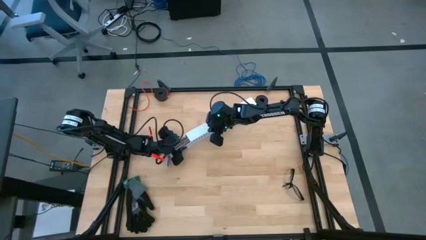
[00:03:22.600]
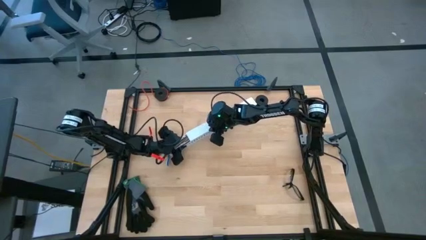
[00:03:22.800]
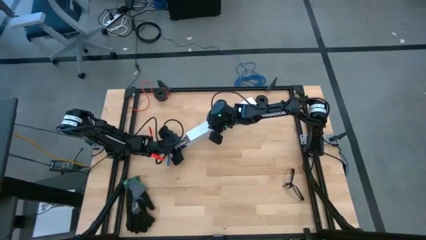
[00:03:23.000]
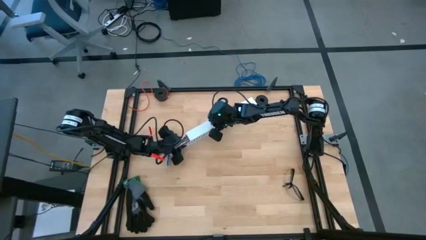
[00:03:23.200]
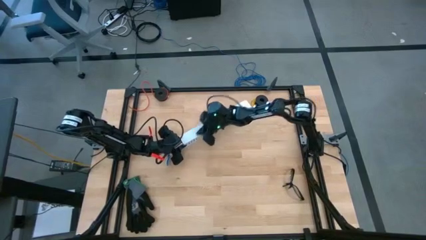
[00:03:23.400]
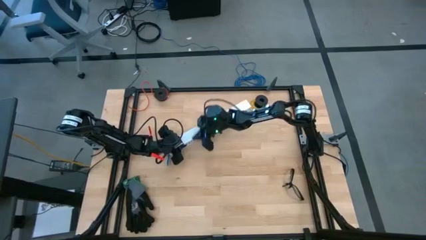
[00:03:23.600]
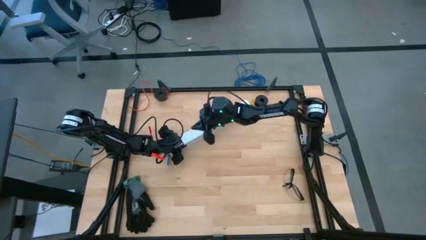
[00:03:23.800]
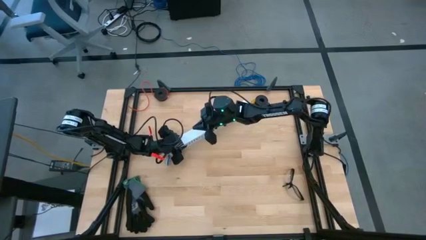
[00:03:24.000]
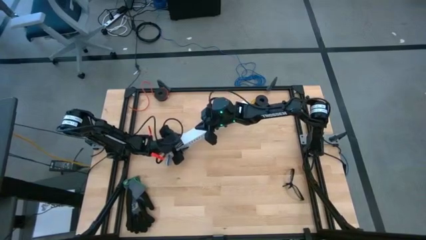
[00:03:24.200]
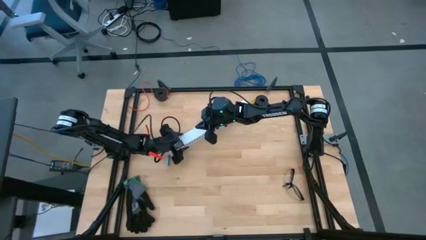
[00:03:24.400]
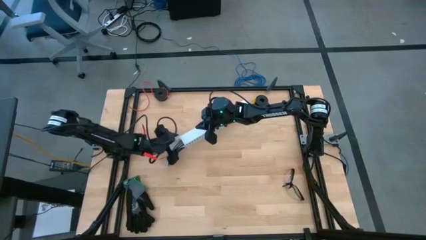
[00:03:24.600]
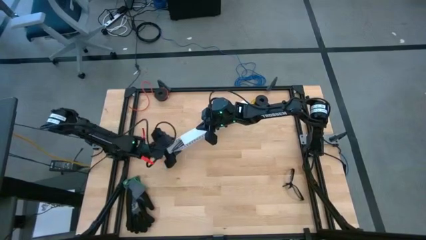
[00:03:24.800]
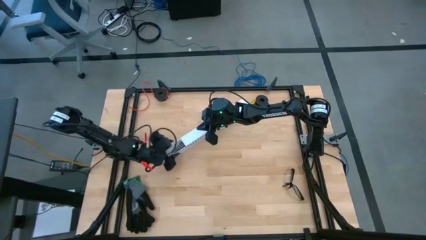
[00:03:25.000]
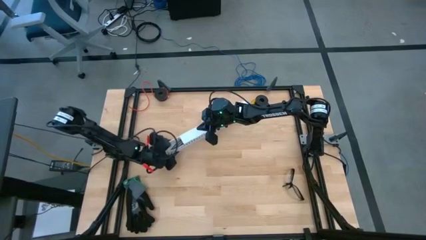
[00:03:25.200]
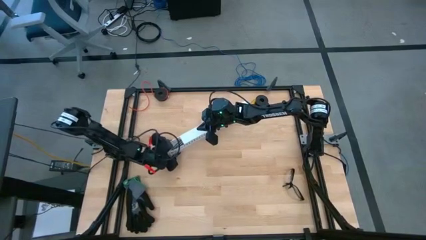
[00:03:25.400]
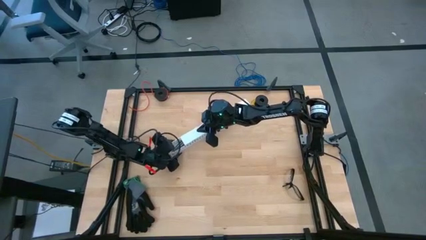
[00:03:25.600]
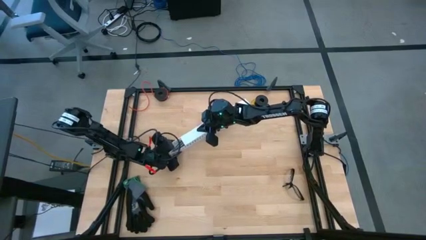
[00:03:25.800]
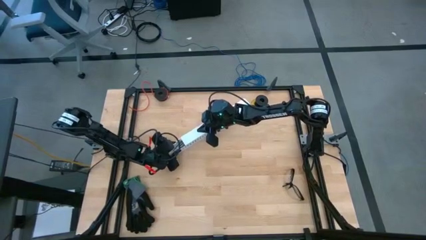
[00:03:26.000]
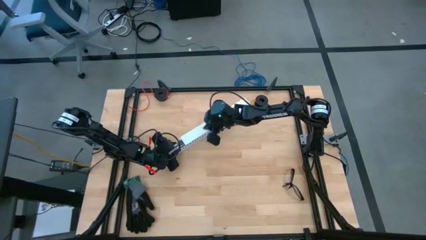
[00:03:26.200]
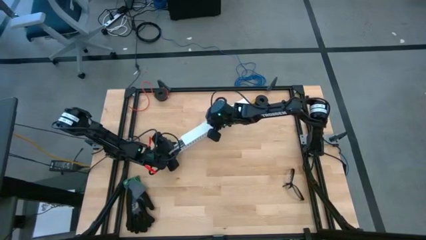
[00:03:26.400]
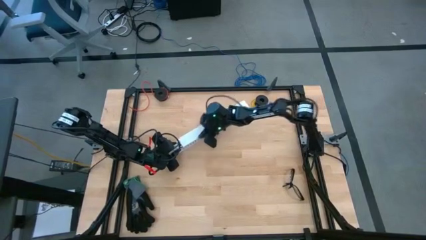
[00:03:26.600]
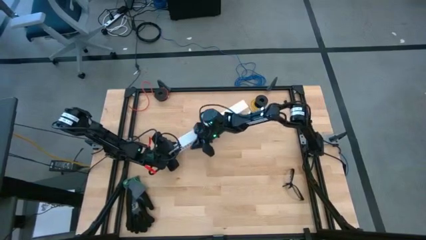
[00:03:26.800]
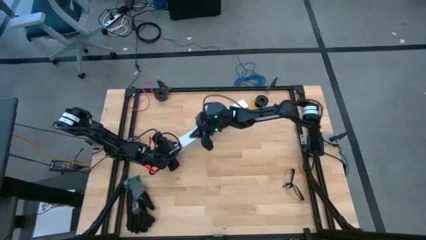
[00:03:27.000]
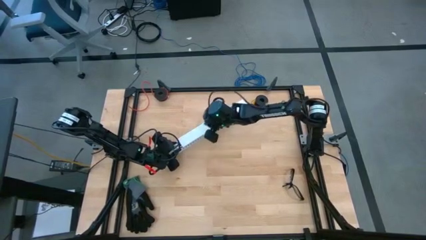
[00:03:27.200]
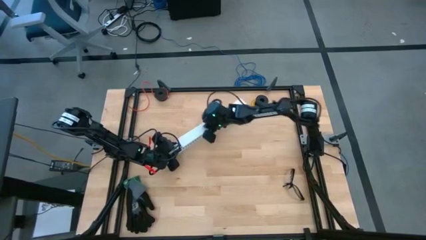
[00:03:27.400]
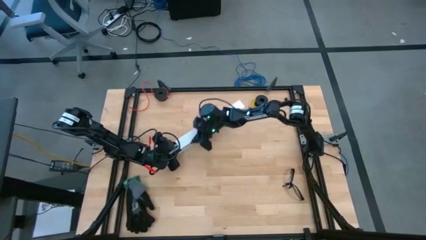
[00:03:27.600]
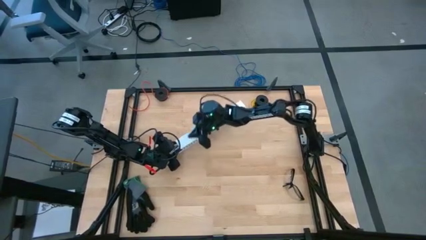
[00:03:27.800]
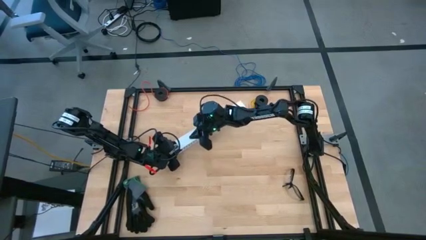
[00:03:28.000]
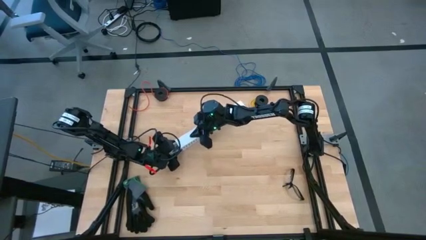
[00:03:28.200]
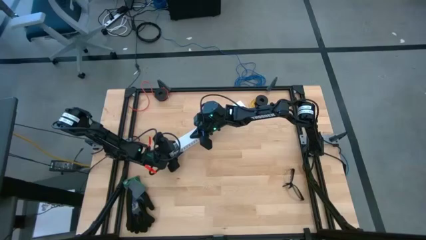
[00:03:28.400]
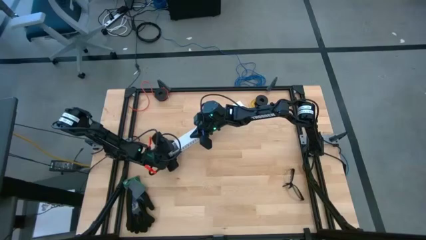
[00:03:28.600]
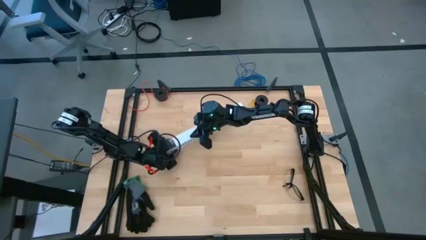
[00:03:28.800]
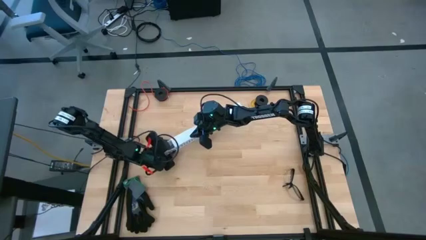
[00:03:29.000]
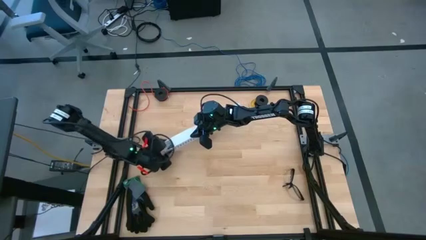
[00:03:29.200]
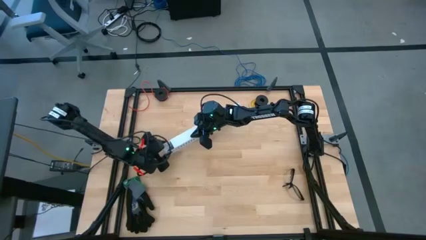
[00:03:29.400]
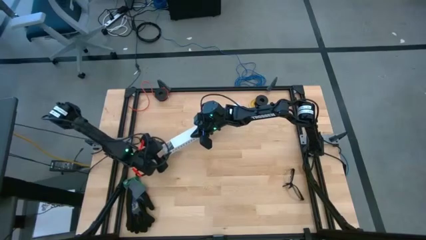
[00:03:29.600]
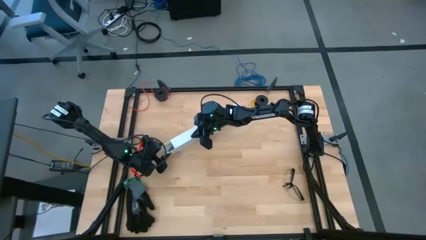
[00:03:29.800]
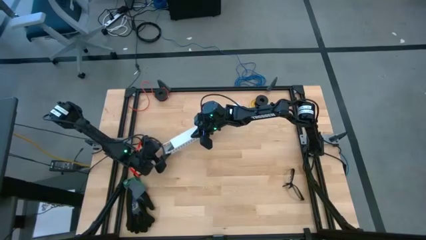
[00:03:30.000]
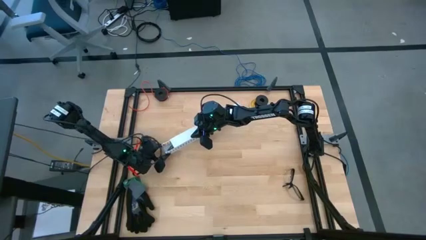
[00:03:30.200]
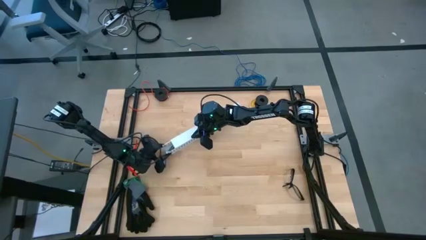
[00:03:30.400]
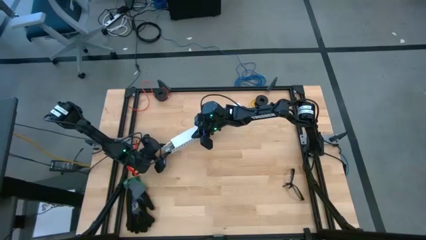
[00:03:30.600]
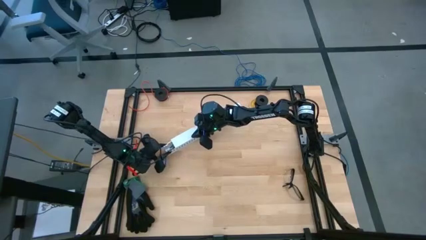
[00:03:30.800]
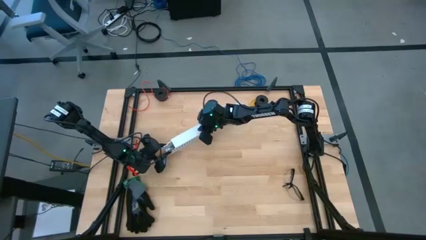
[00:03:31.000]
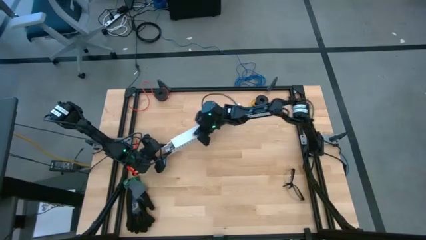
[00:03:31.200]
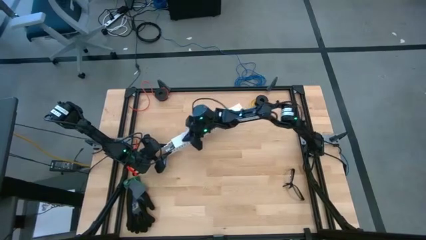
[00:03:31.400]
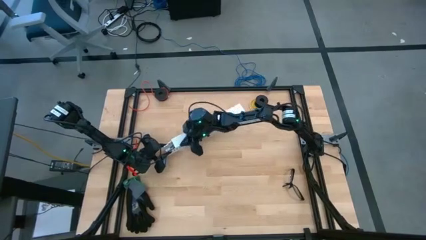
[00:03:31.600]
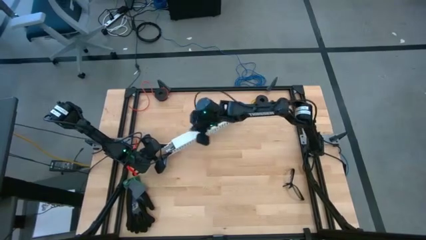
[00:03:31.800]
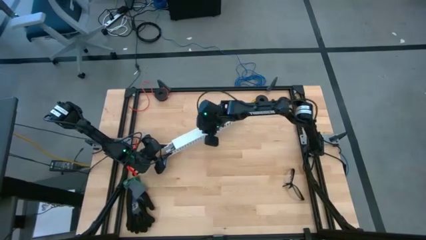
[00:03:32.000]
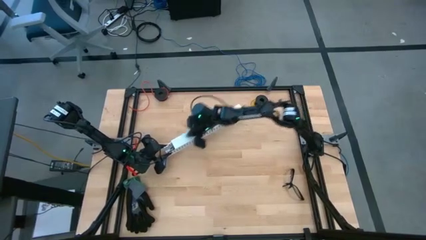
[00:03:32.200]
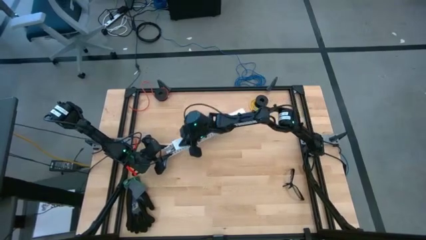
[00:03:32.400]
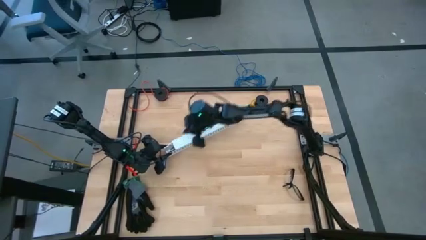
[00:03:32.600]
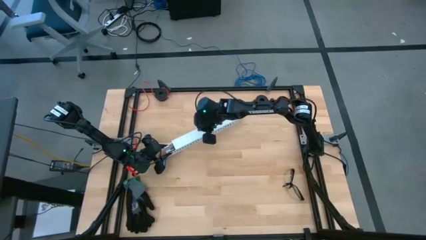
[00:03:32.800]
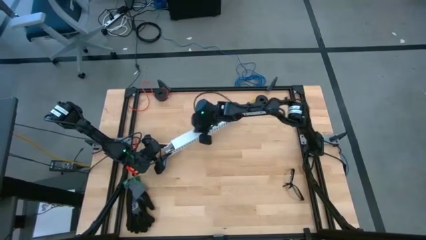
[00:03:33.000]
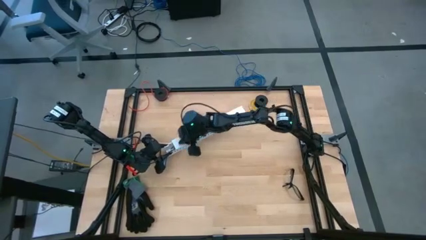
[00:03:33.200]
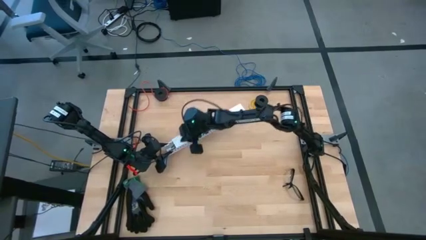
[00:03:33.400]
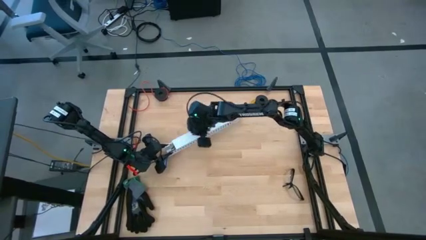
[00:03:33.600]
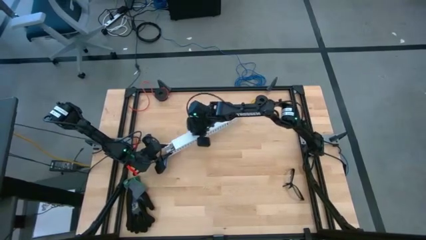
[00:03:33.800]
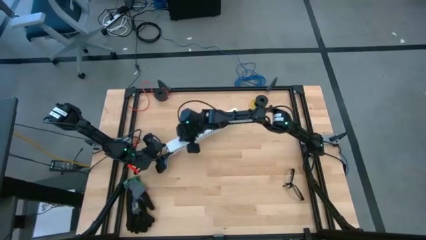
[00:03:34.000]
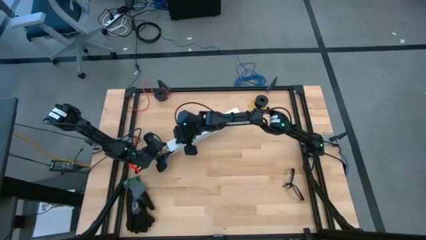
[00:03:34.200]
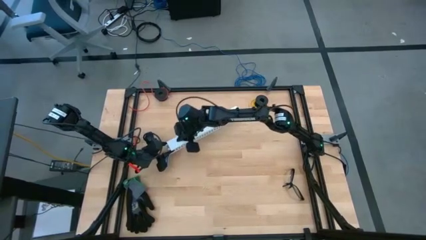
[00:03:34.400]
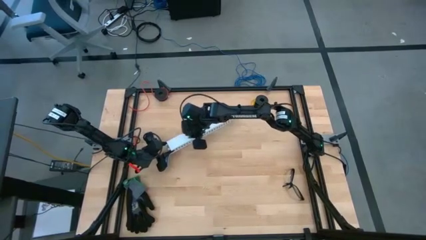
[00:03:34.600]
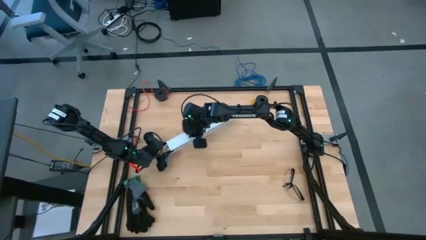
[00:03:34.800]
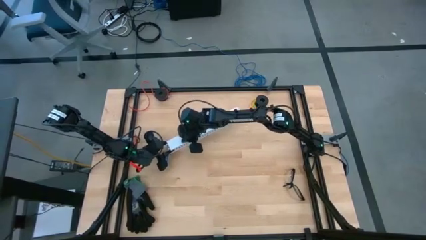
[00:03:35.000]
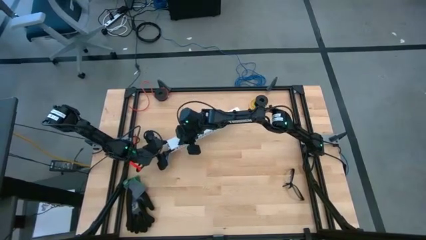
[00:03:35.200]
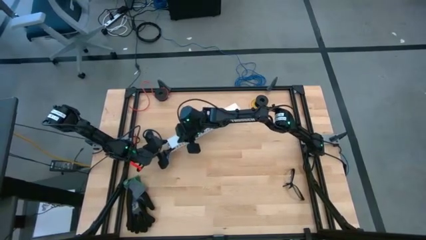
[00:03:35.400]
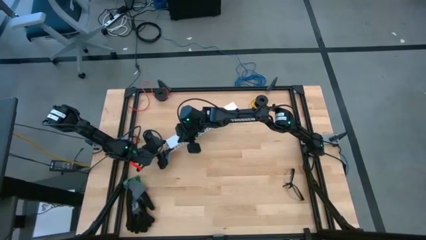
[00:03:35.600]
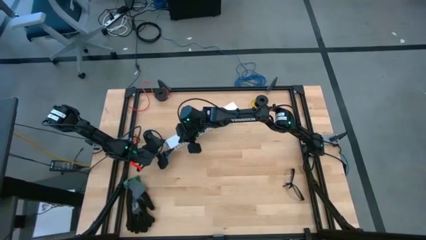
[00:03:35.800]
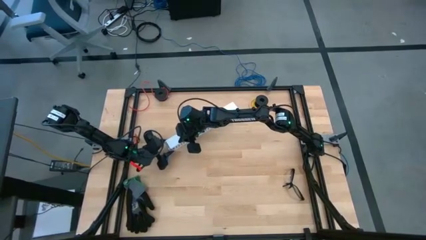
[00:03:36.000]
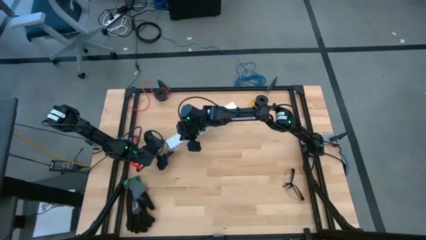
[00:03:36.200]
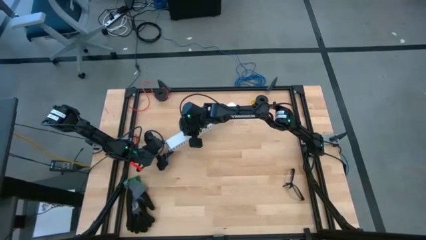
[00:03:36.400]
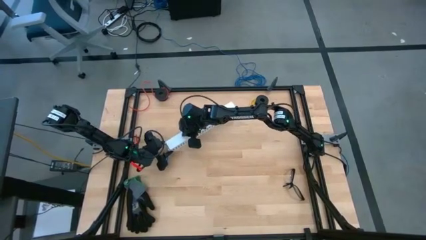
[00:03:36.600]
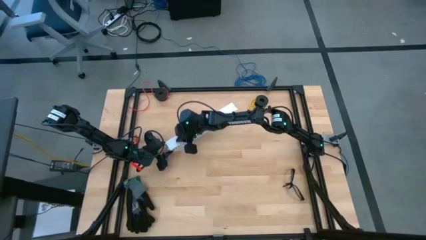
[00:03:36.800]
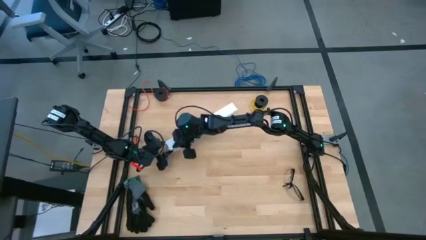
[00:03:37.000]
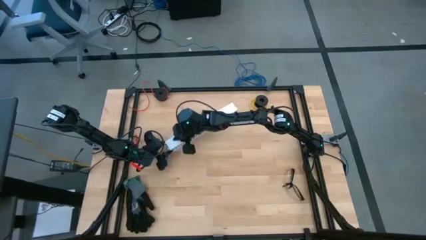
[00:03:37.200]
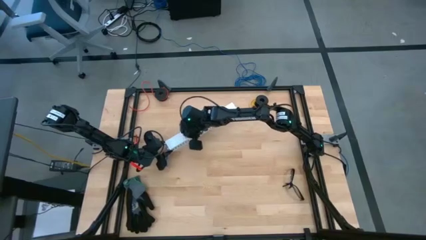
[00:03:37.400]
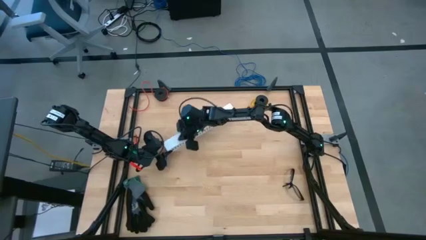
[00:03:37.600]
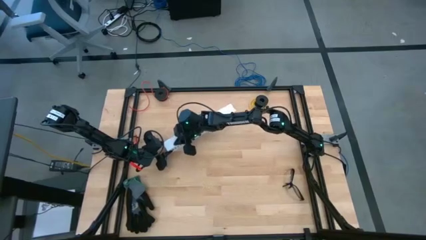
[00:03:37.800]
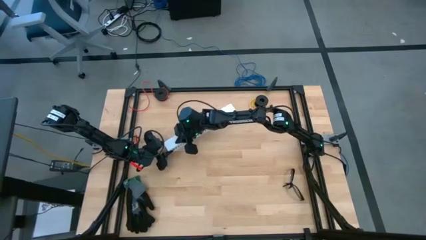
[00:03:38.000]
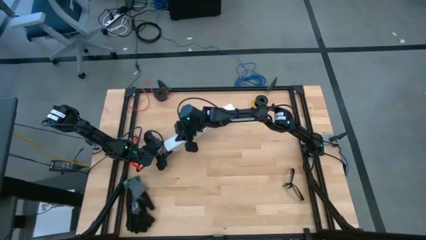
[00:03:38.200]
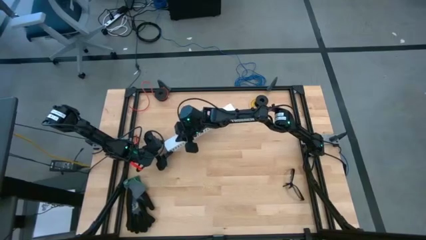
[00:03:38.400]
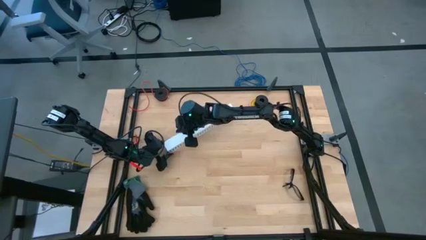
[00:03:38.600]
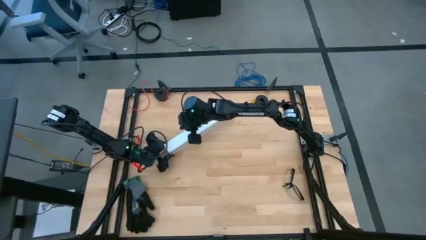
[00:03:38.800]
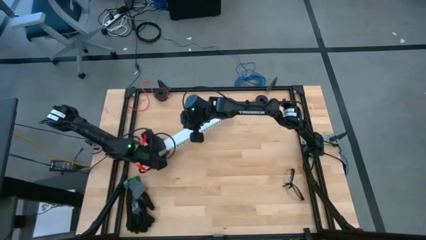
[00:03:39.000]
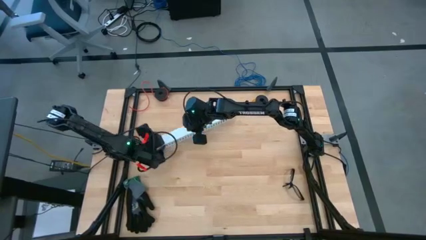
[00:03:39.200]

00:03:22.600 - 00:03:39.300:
Task: Ziptie cables
Close the white cable duct
